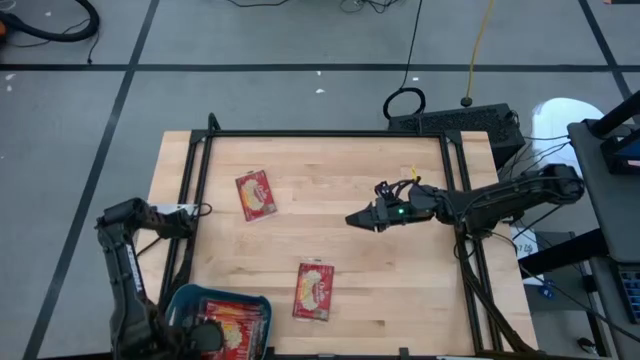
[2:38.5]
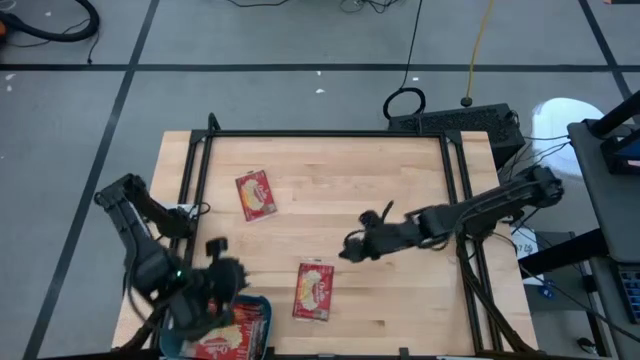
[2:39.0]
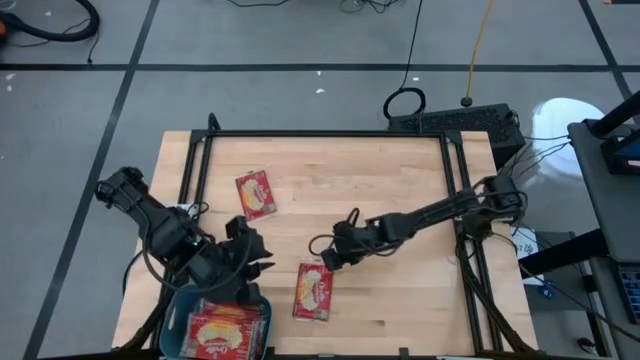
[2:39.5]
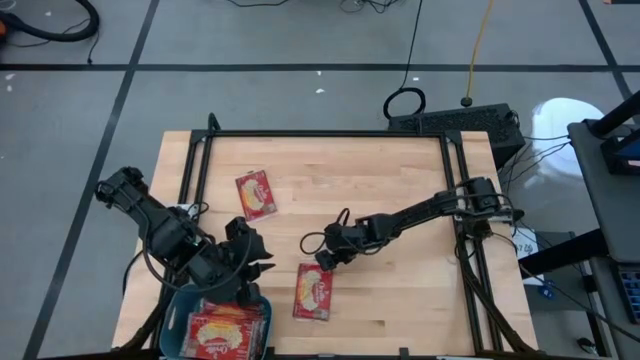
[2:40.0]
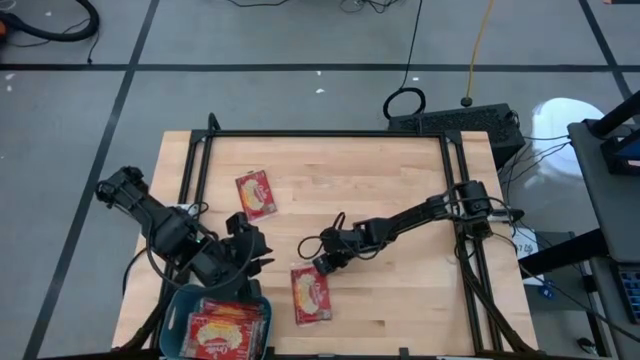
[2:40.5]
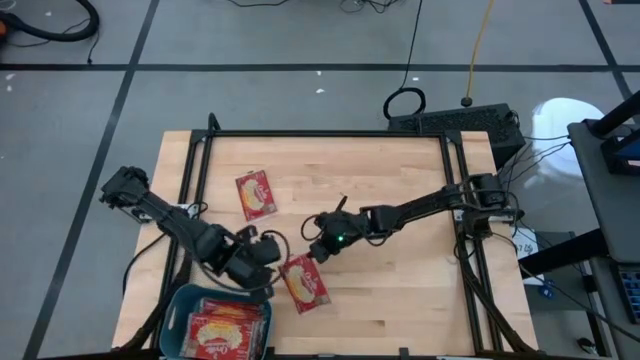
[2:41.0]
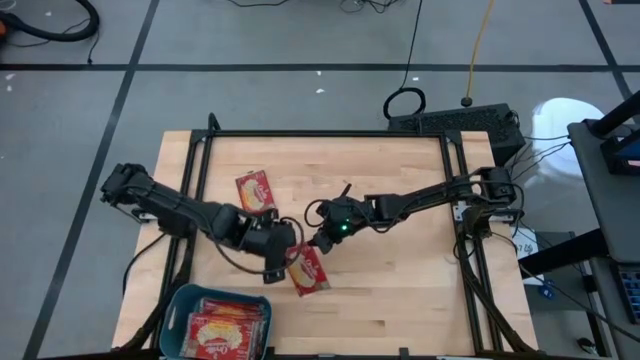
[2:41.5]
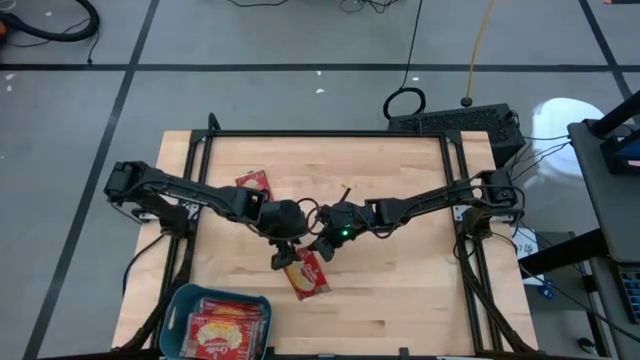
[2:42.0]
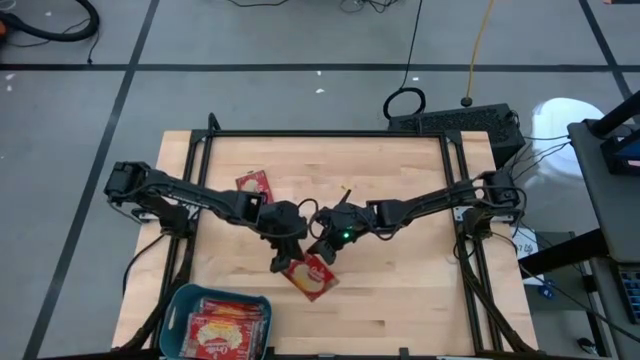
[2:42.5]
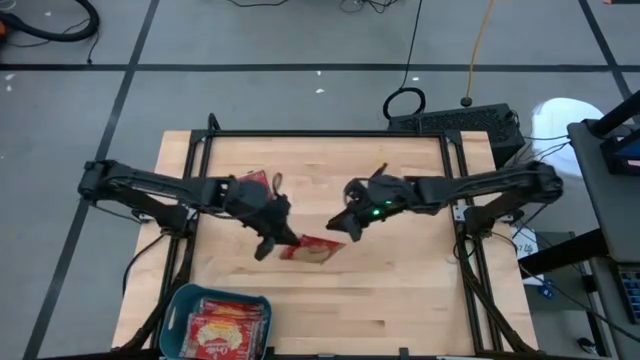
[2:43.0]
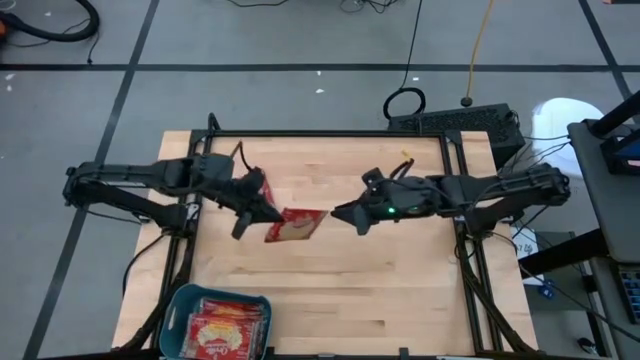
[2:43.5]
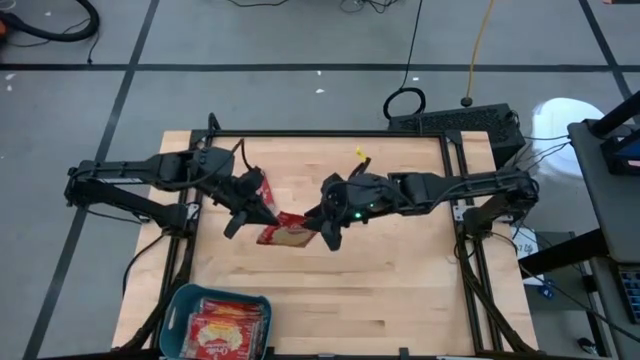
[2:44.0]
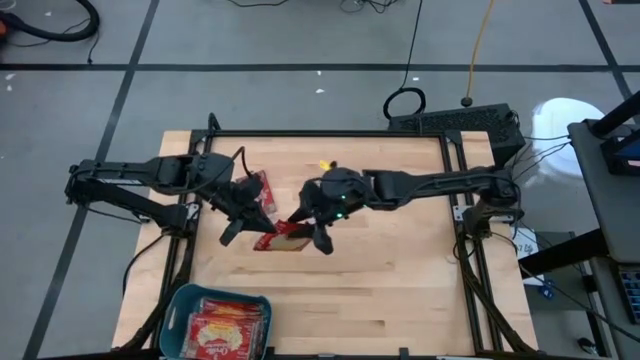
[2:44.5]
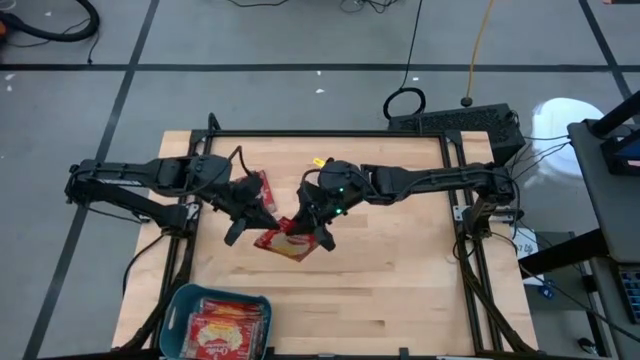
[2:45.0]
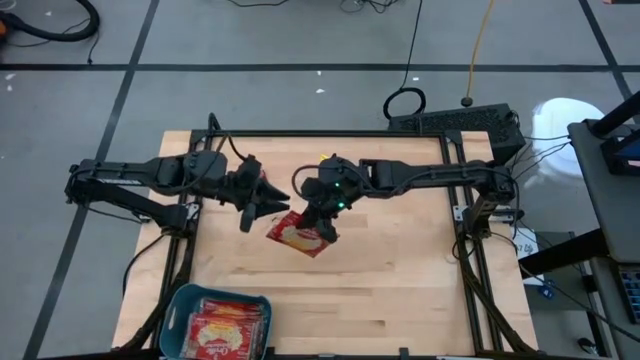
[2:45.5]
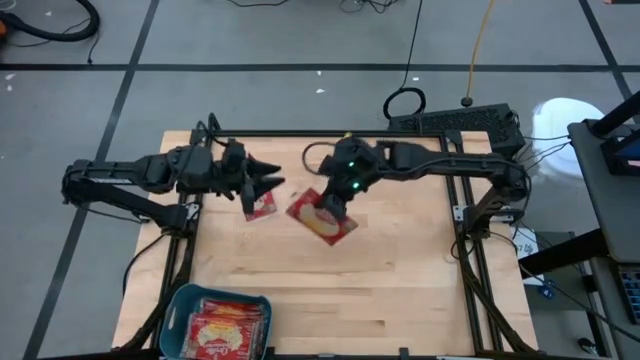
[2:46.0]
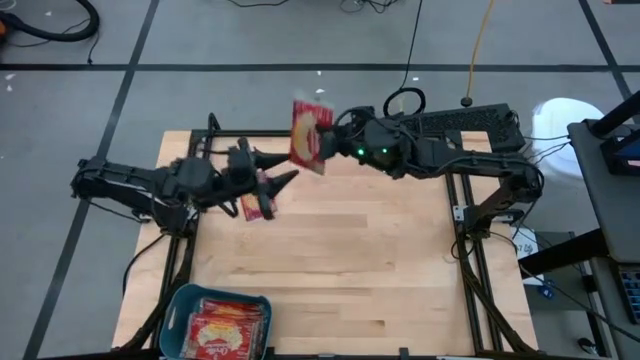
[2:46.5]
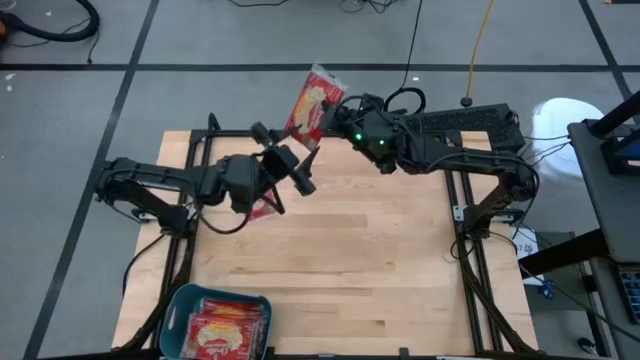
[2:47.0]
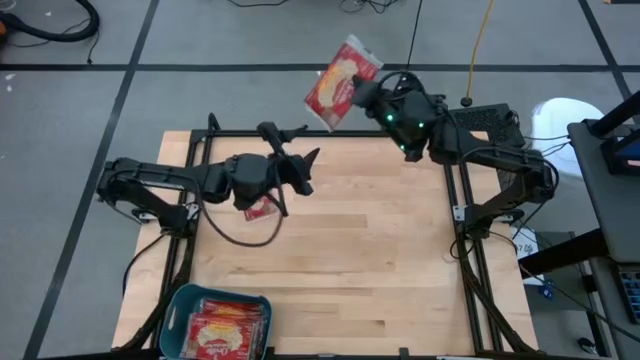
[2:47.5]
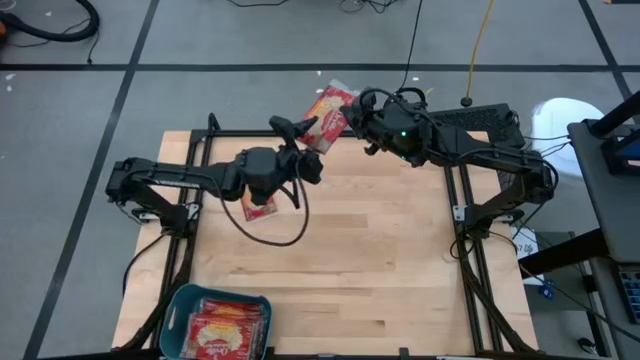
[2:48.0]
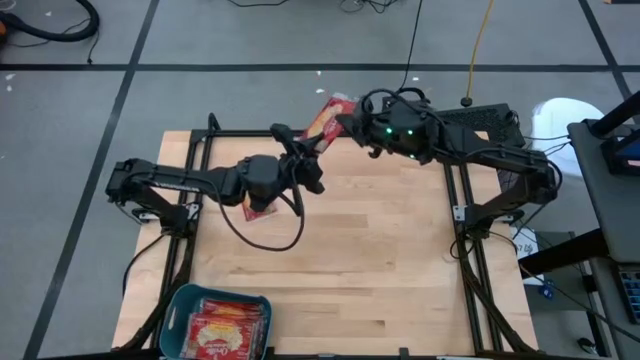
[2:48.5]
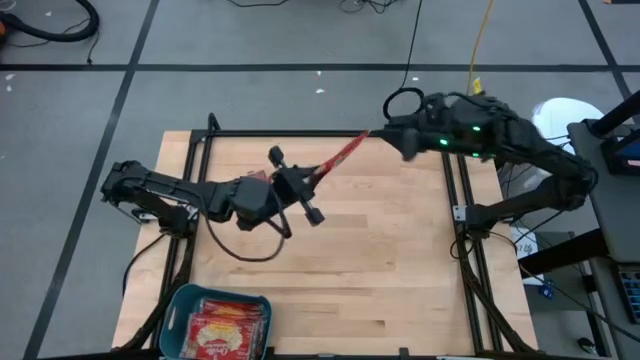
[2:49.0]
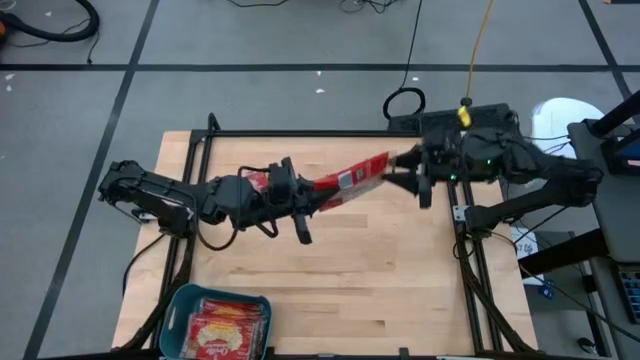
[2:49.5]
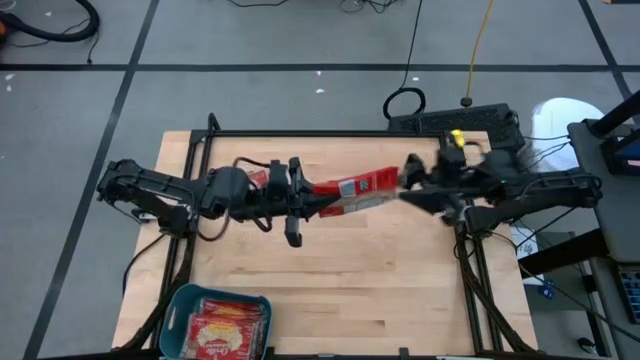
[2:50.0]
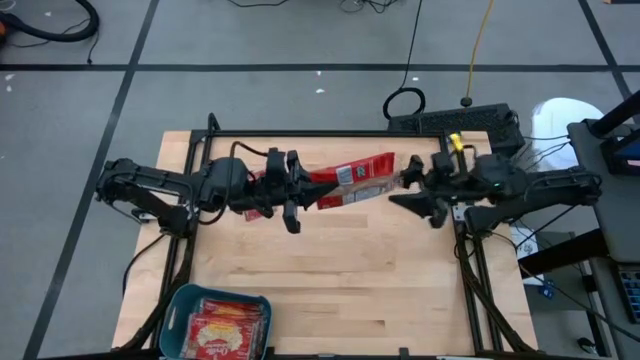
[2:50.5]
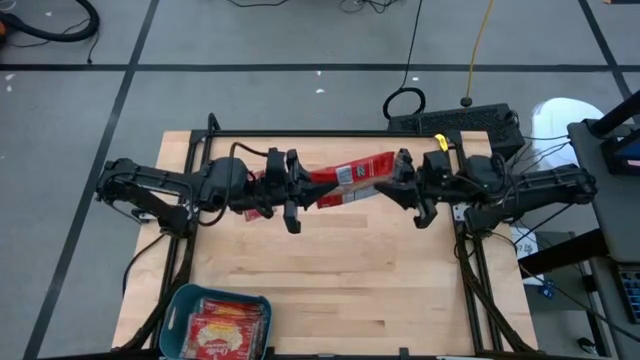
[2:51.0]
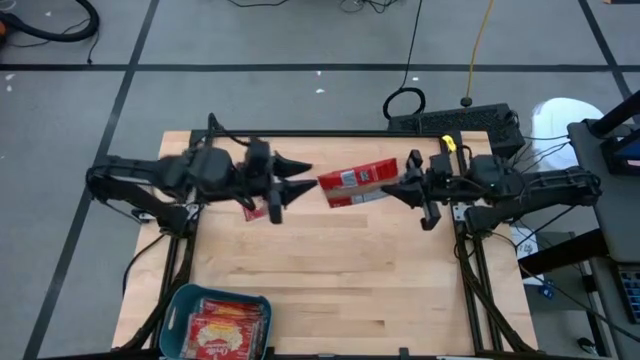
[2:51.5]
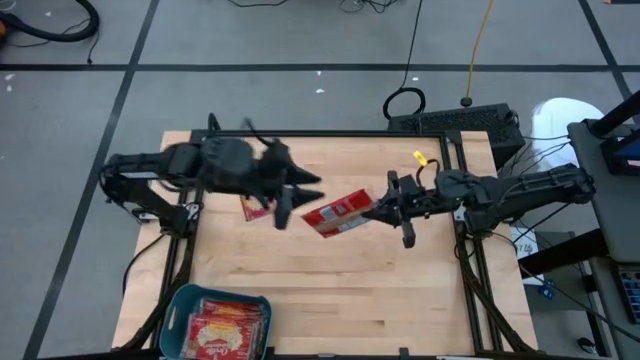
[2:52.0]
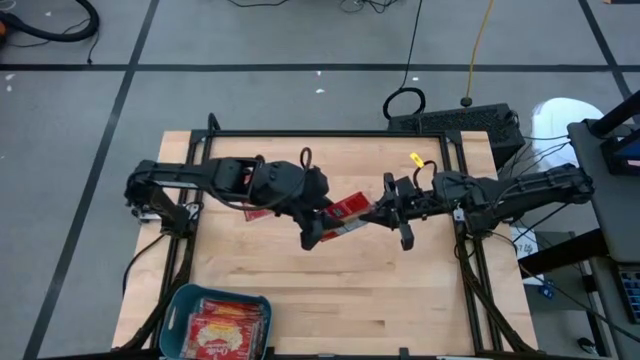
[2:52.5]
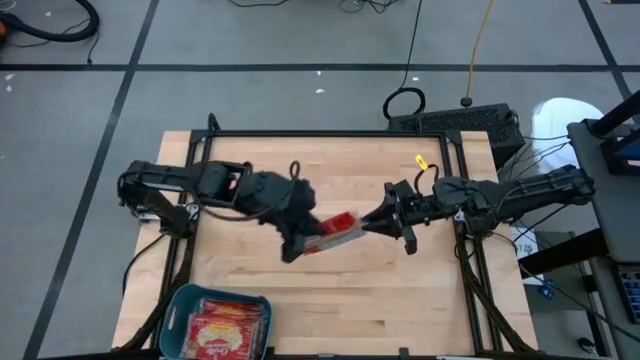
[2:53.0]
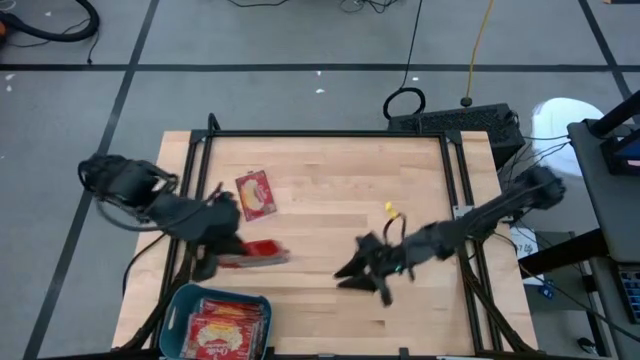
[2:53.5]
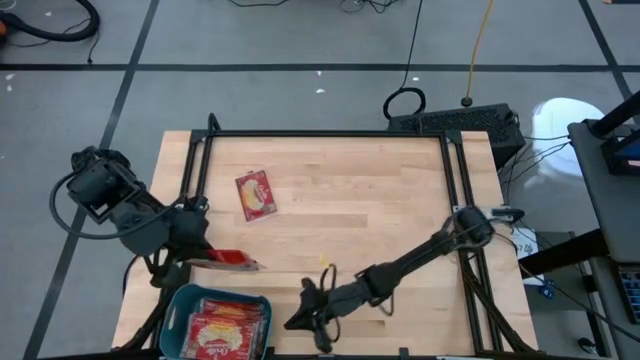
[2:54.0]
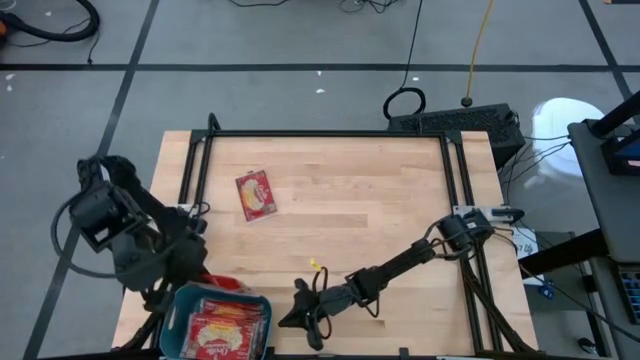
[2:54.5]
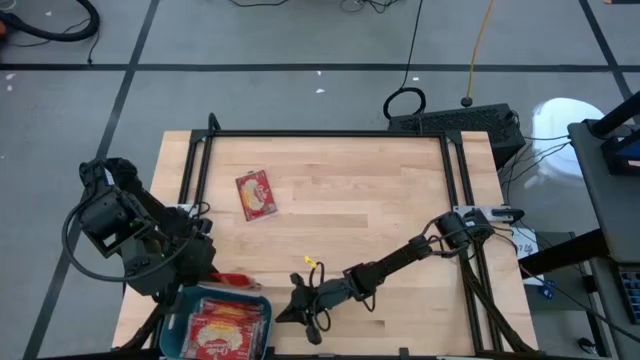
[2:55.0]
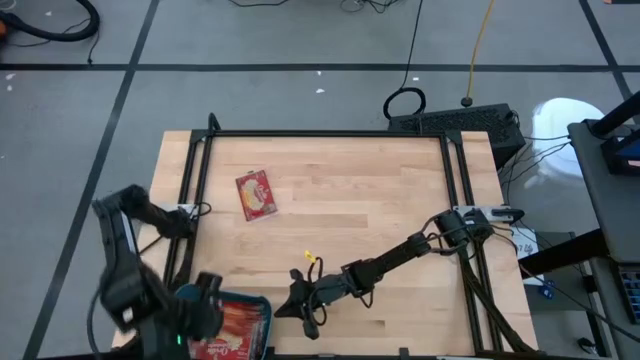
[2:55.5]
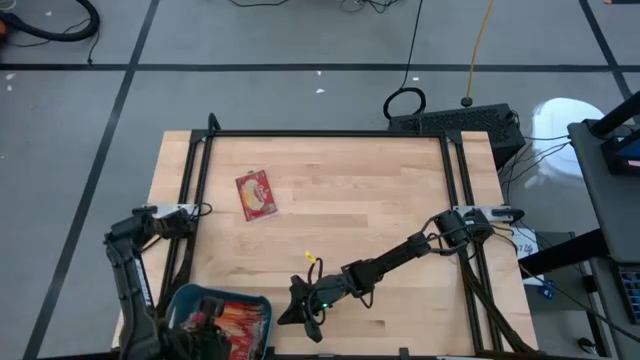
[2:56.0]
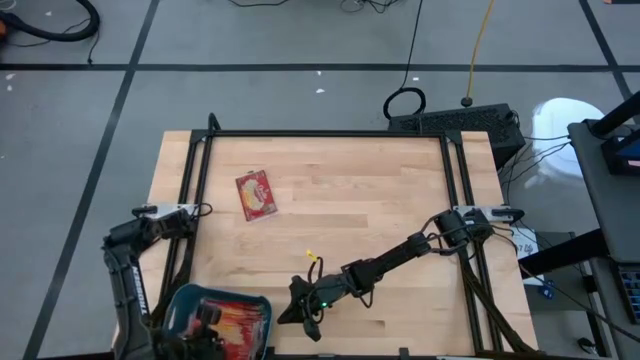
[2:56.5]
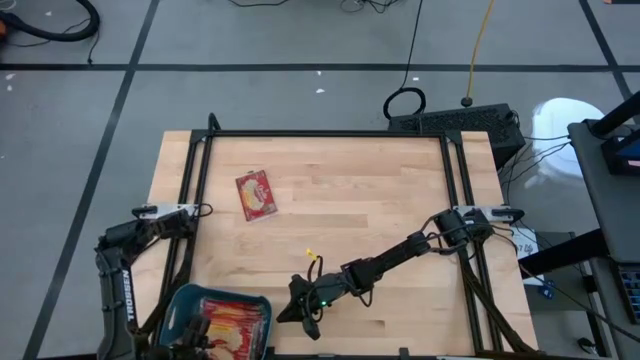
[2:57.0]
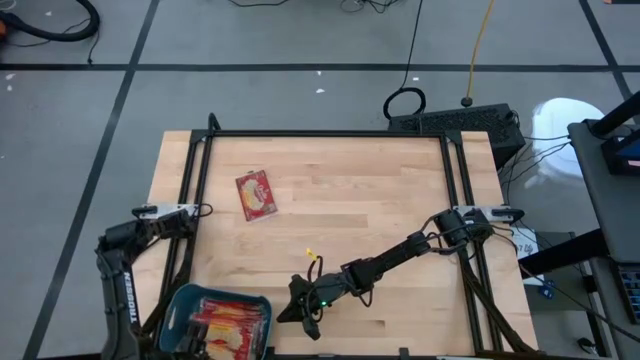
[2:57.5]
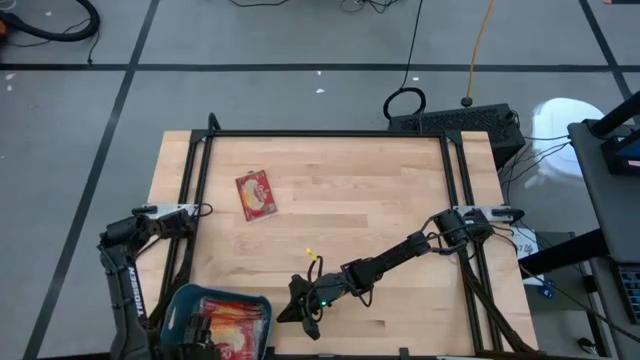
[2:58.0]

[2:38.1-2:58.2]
Task: Sort popcorn bags into baskets
Put the popcorn sachet into the bin
